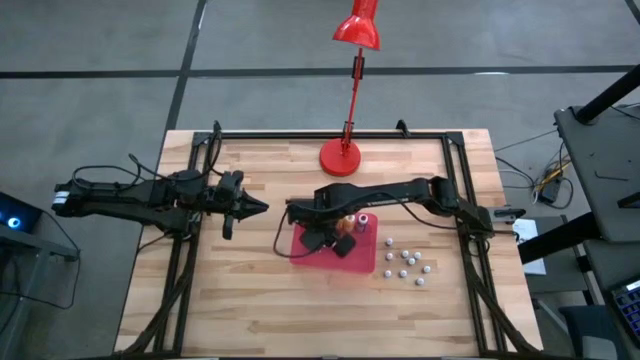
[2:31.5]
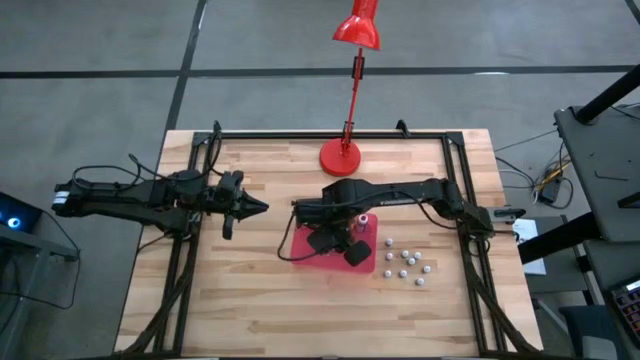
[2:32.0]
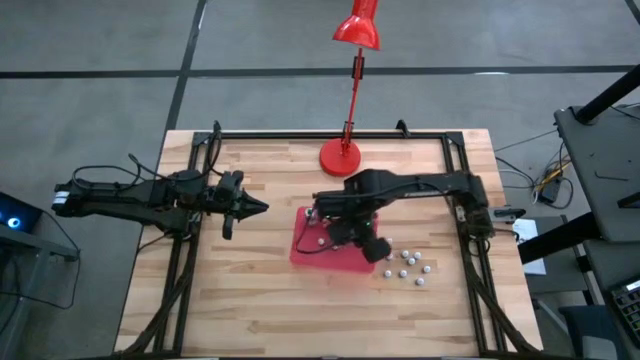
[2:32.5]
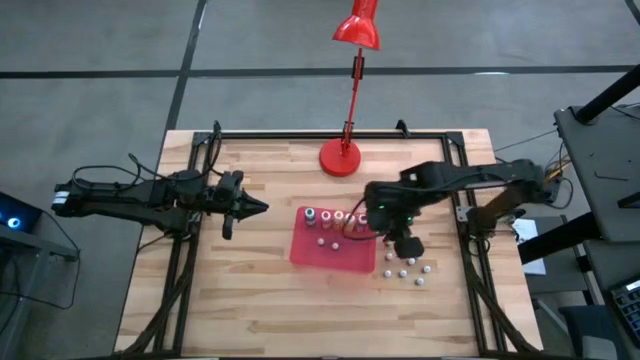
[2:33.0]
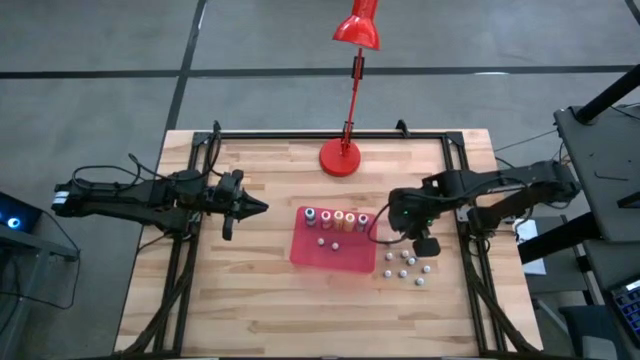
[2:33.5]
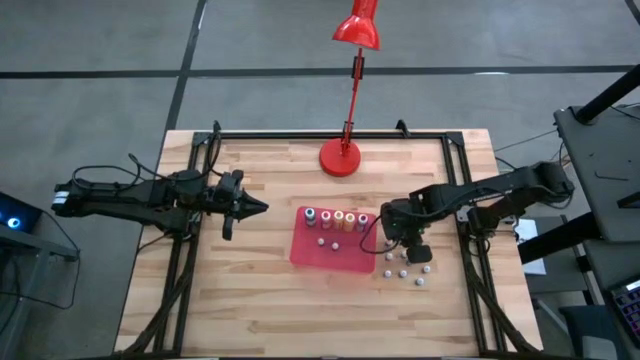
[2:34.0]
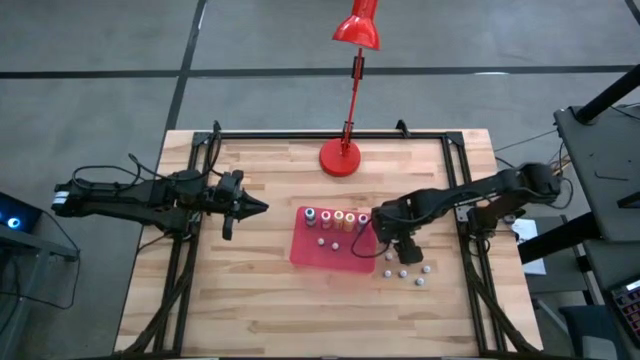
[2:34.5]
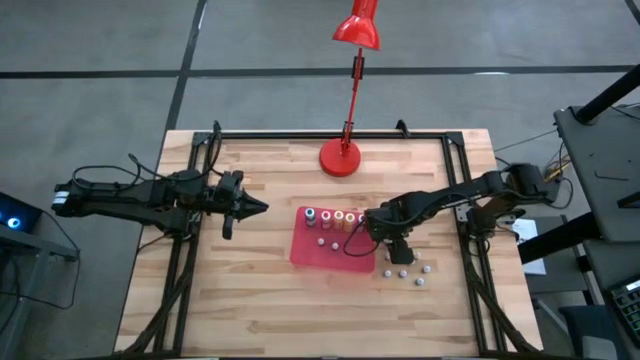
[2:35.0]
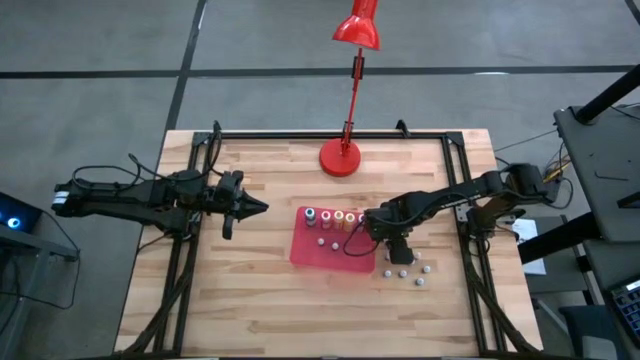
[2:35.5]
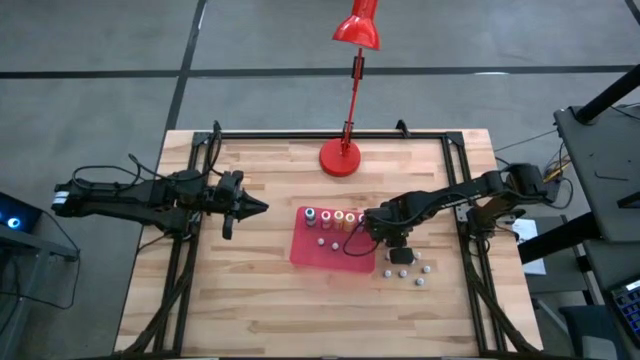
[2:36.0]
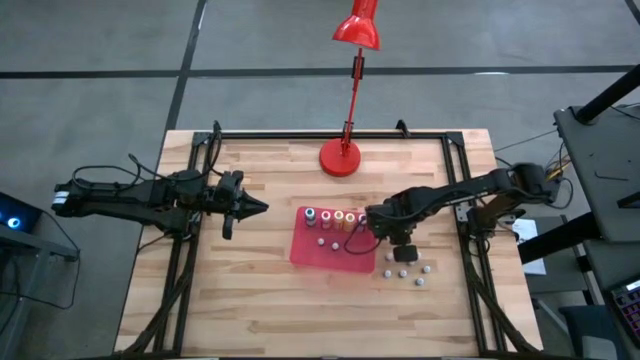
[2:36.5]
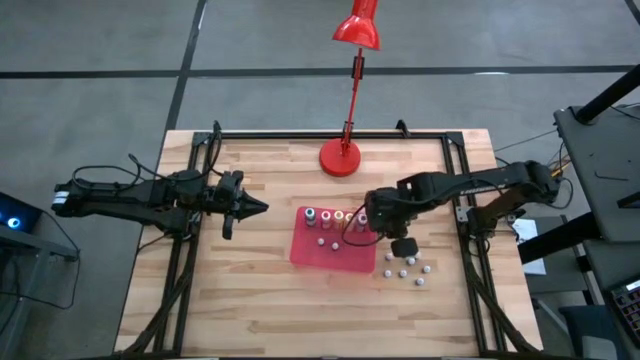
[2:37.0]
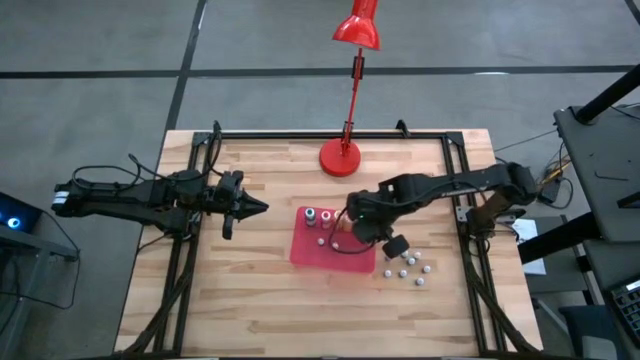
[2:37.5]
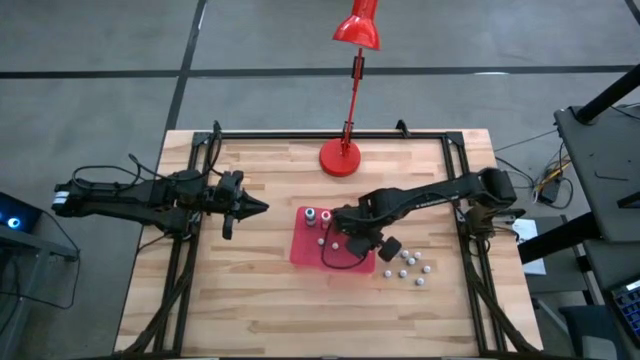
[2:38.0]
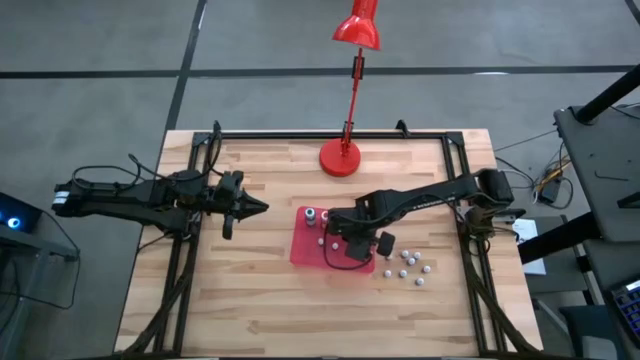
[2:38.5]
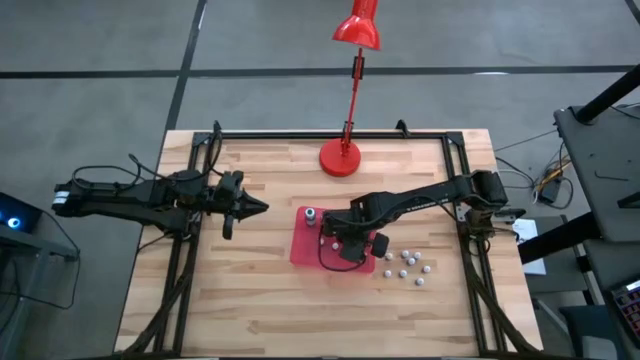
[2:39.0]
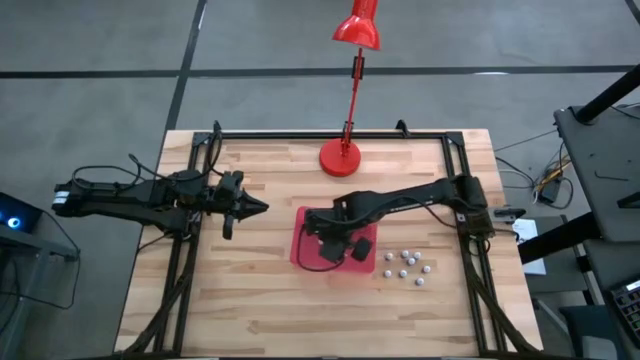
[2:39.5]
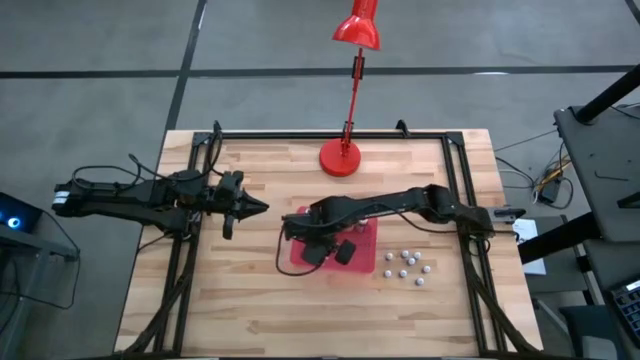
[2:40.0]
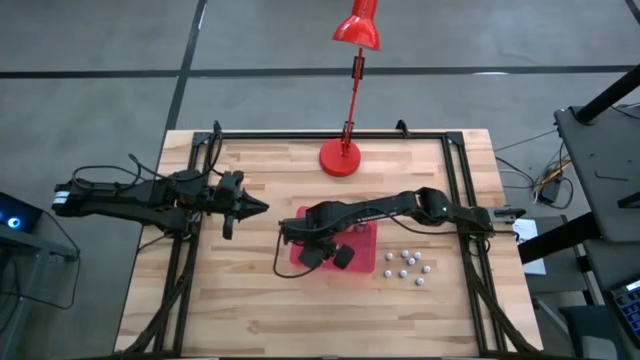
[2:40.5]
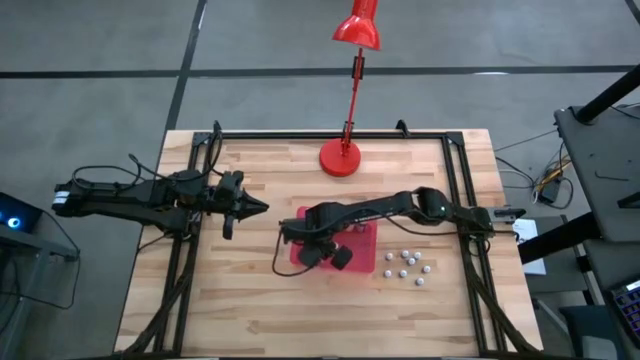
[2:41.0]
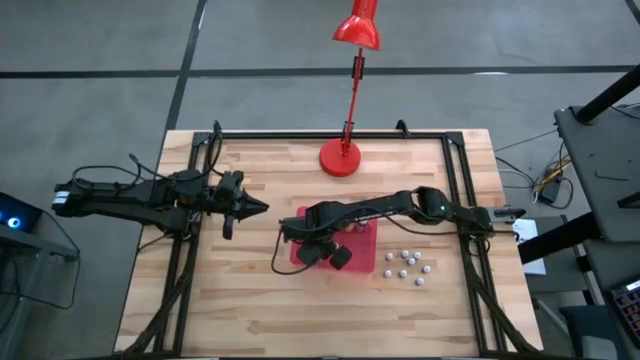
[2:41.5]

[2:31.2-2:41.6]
Task: Pick & Place food coloring
Put the small black food coloring bottle into the red bin

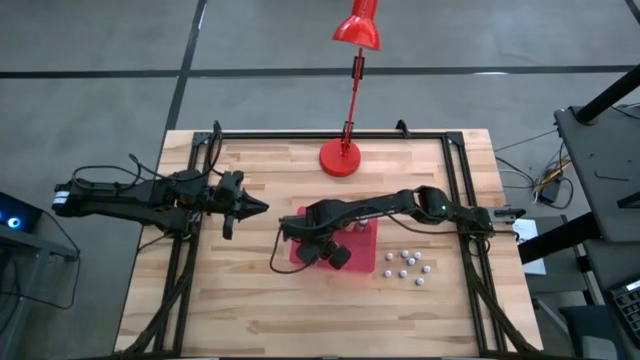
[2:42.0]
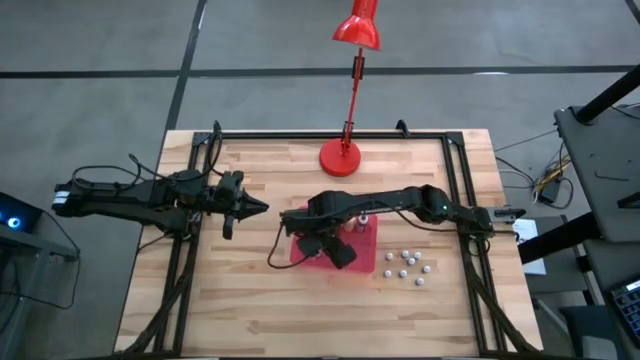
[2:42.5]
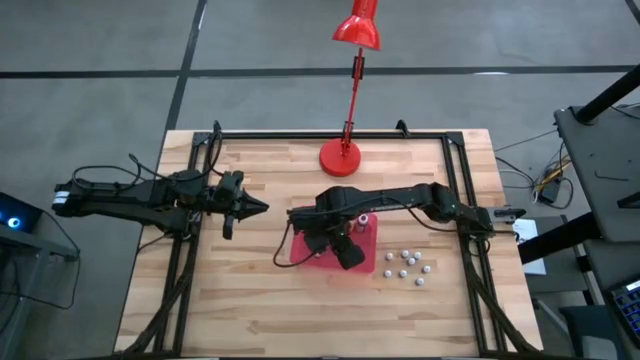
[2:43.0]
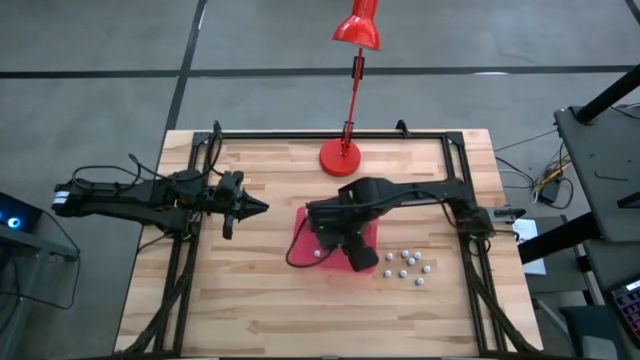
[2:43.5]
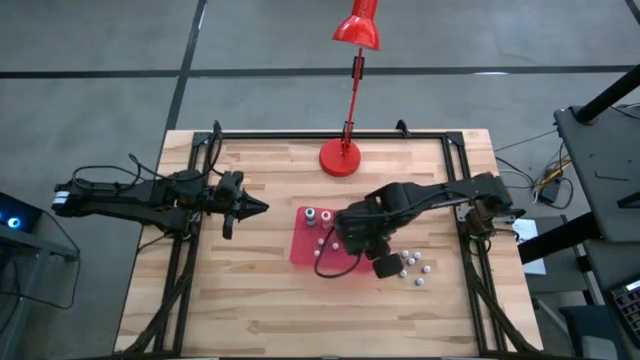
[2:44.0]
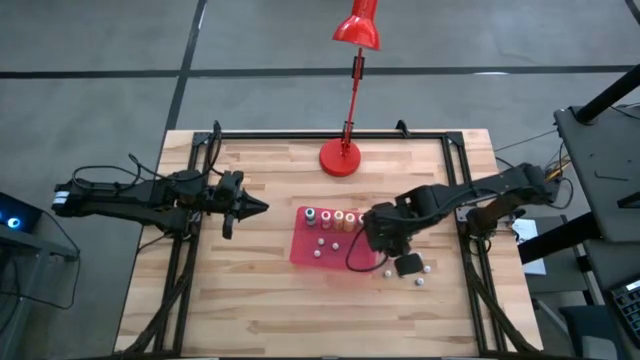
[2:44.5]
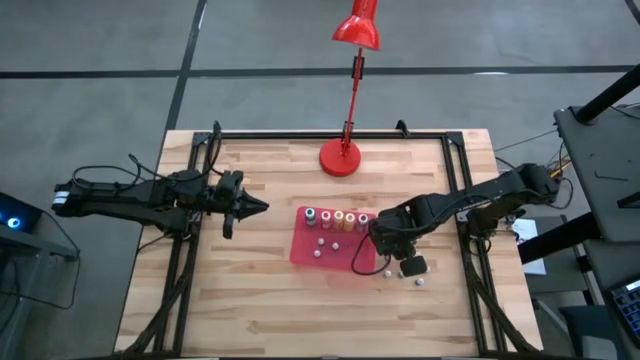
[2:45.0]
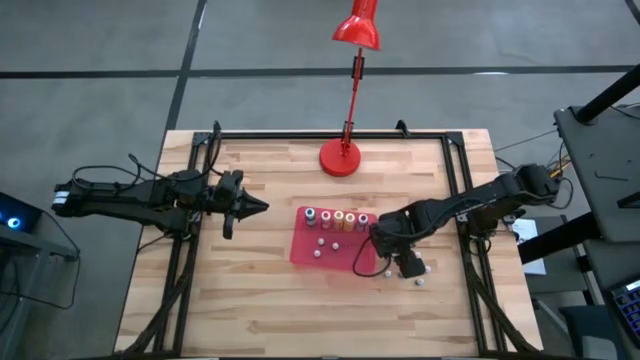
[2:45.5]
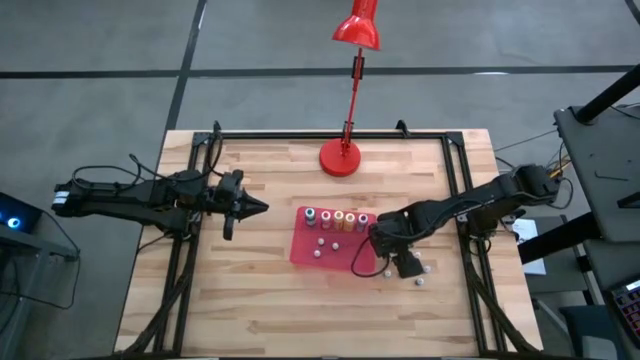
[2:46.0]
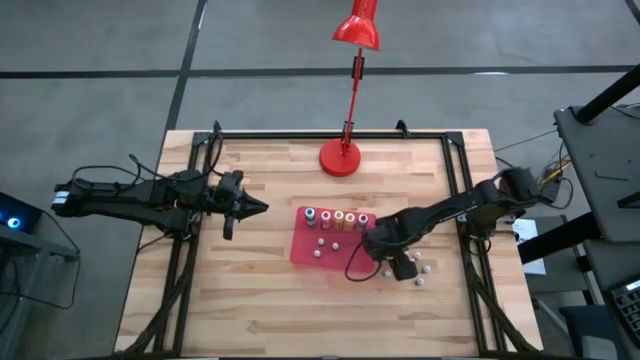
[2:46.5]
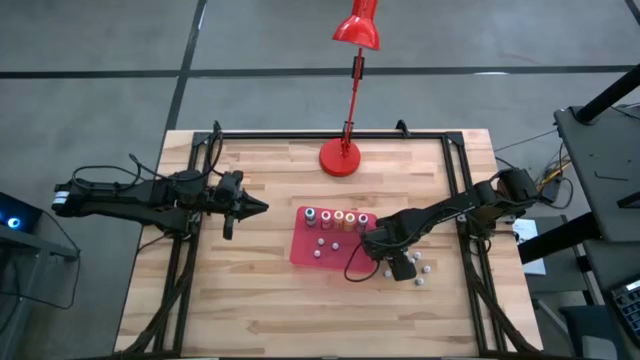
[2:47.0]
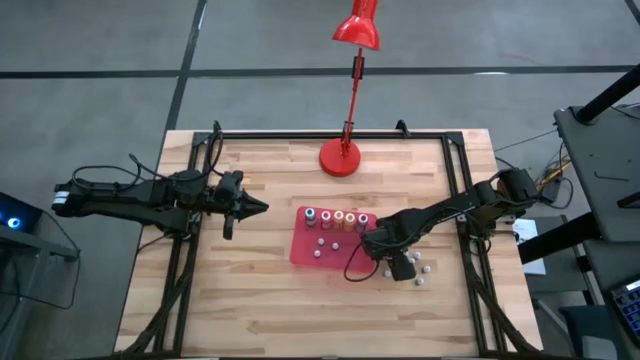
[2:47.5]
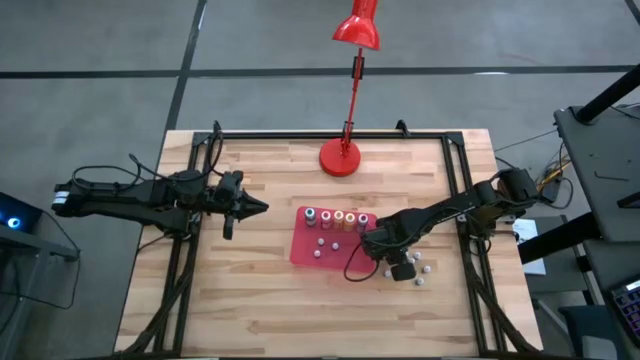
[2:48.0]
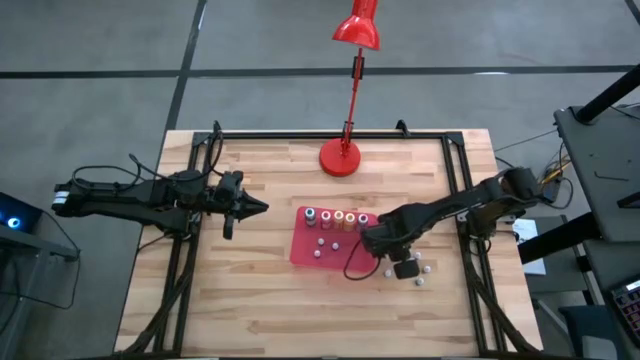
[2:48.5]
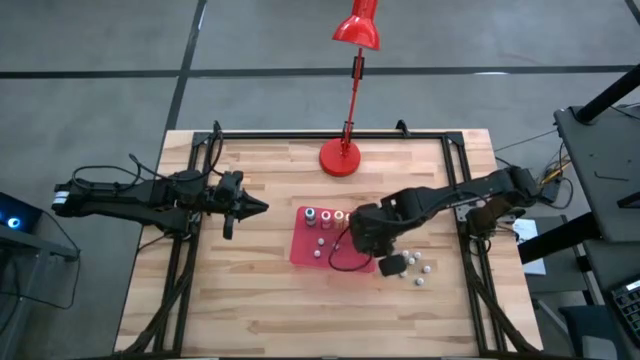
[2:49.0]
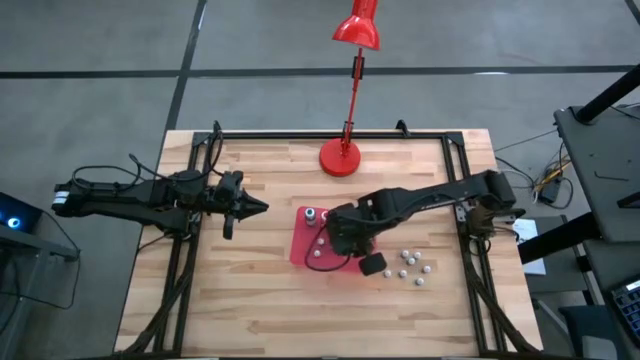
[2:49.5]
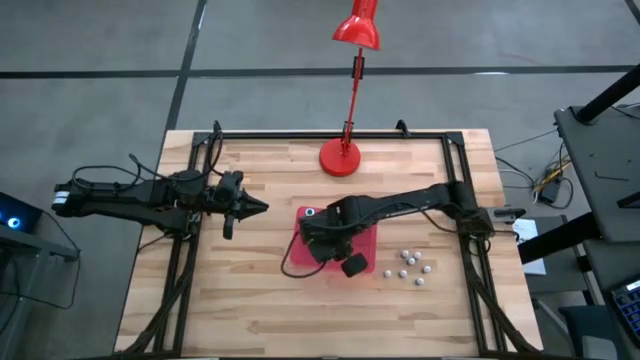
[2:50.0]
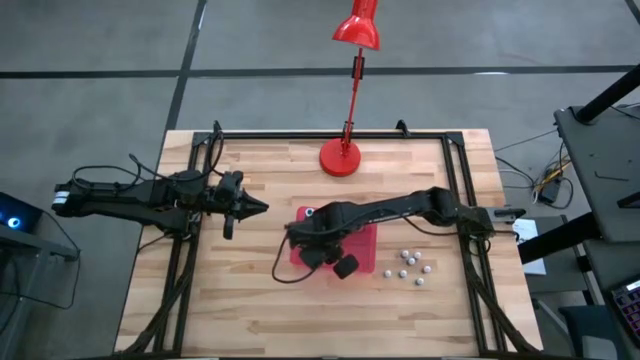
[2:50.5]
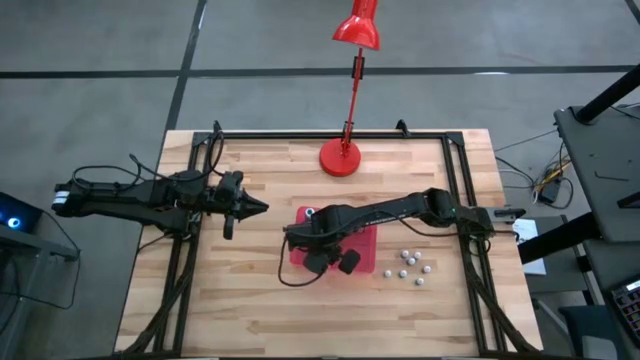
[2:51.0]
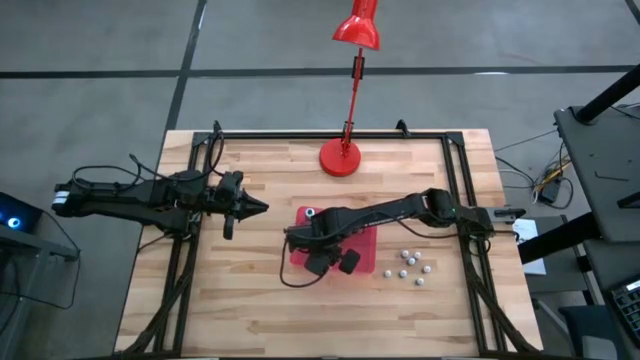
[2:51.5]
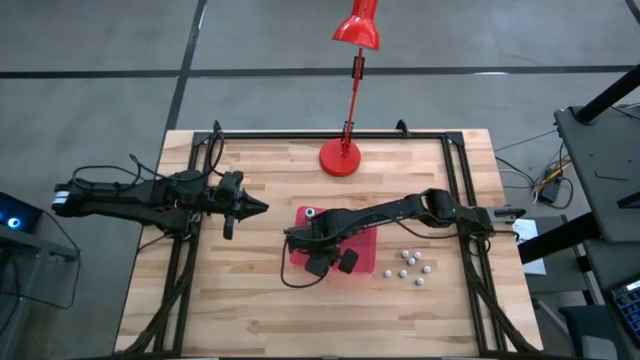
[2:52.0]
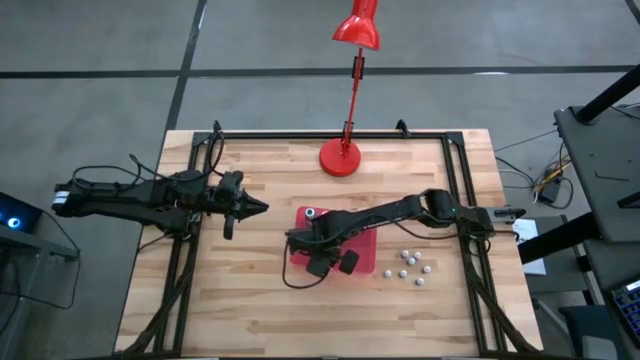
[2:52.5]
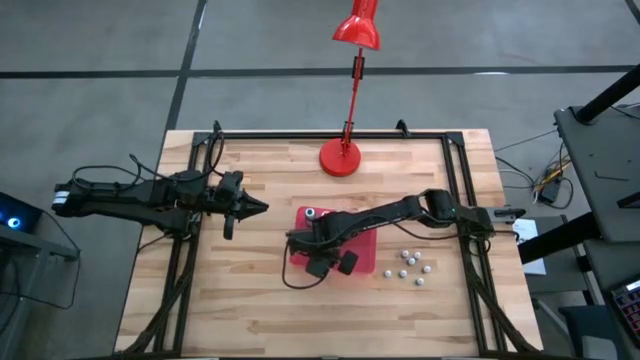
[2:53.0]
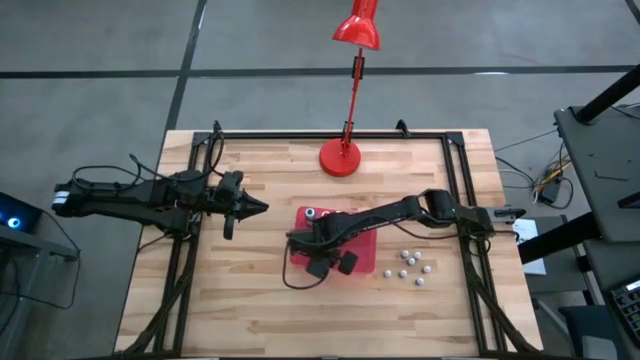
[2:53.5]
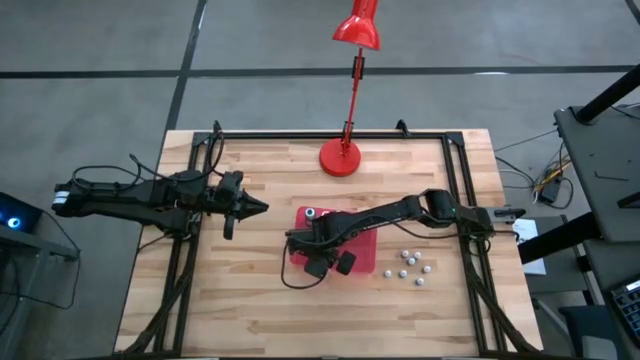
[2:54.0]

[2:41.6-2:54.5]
Put the small red food coloring bottle into the red bin
